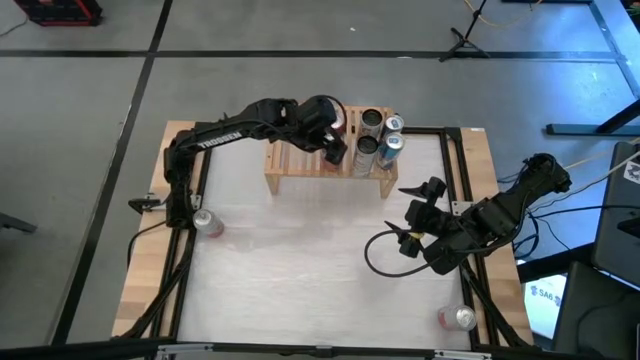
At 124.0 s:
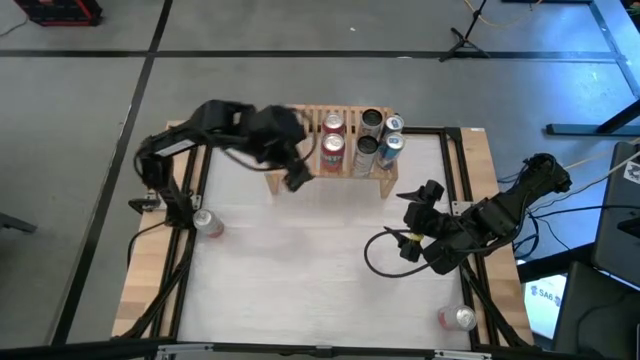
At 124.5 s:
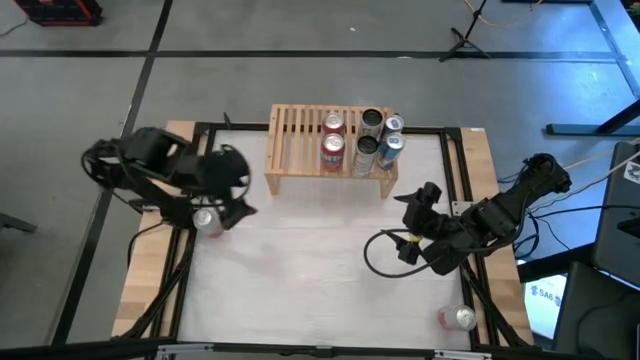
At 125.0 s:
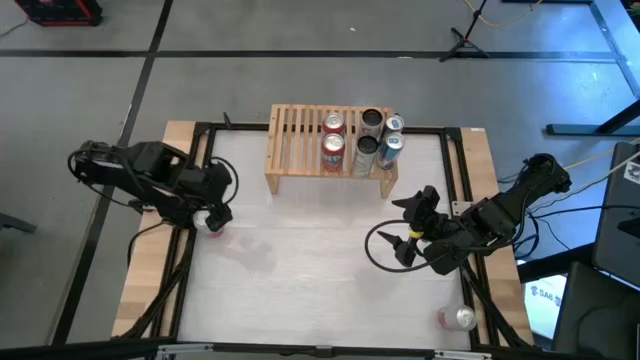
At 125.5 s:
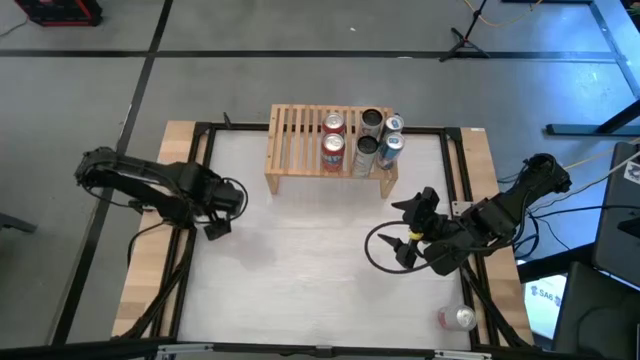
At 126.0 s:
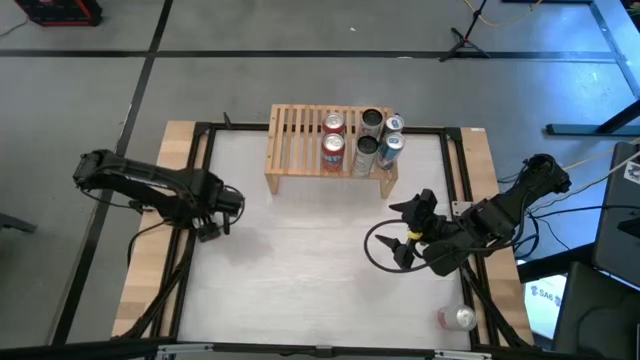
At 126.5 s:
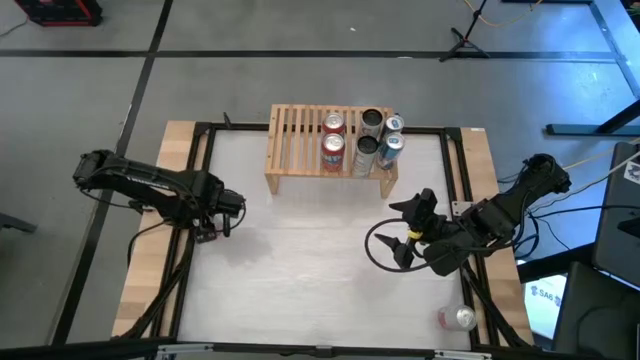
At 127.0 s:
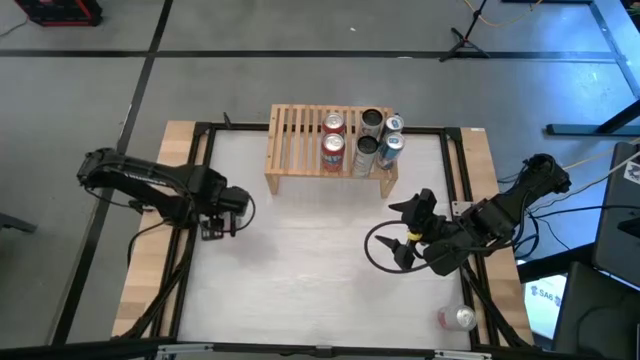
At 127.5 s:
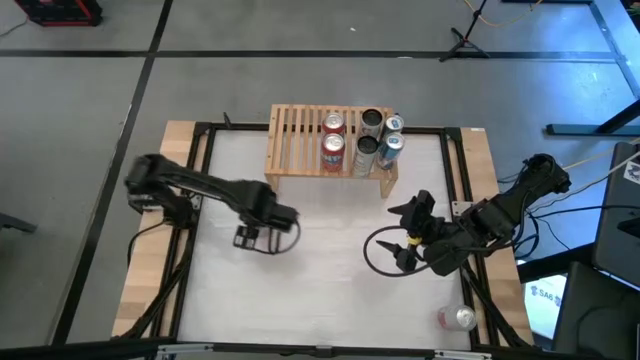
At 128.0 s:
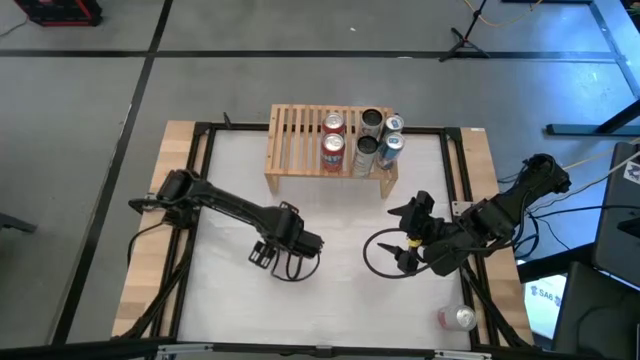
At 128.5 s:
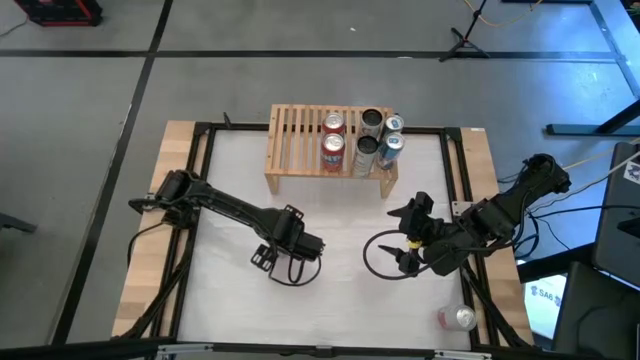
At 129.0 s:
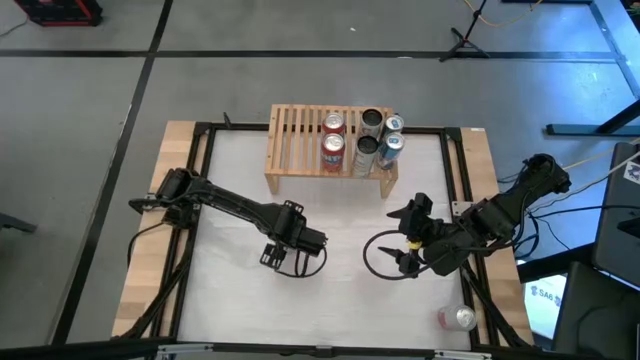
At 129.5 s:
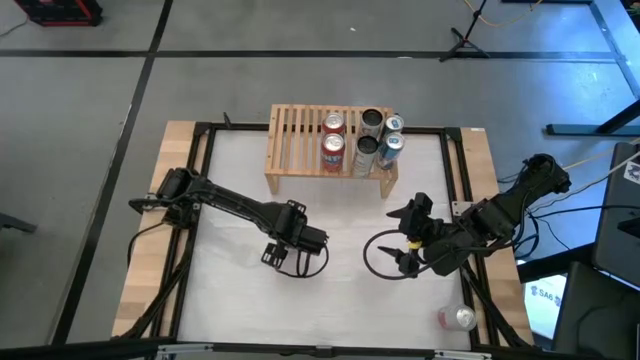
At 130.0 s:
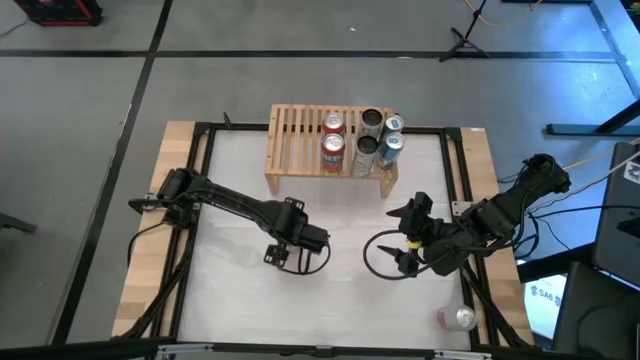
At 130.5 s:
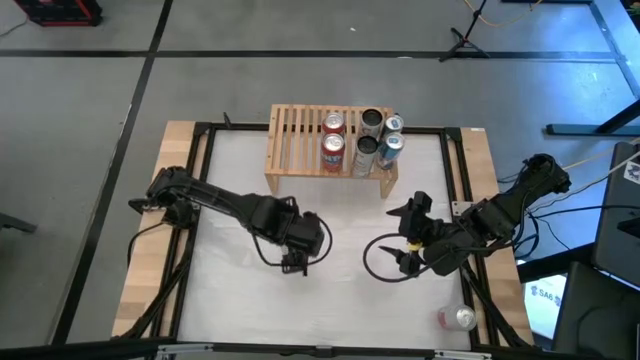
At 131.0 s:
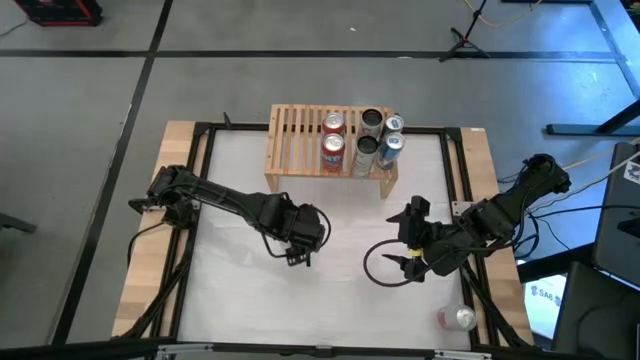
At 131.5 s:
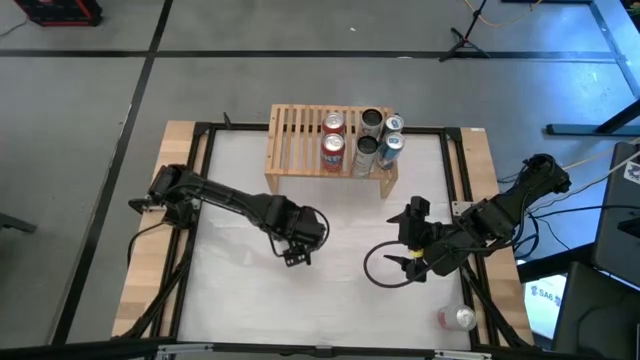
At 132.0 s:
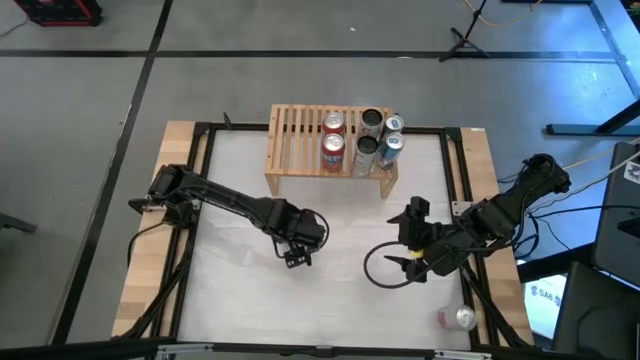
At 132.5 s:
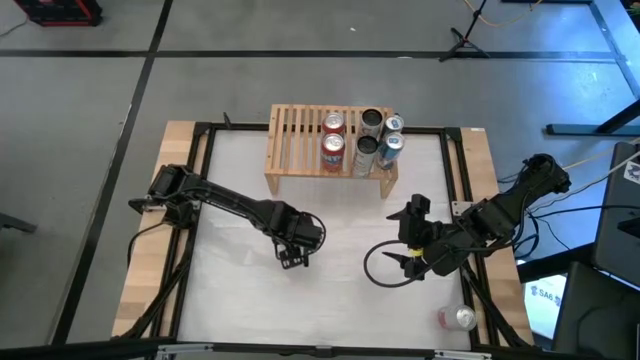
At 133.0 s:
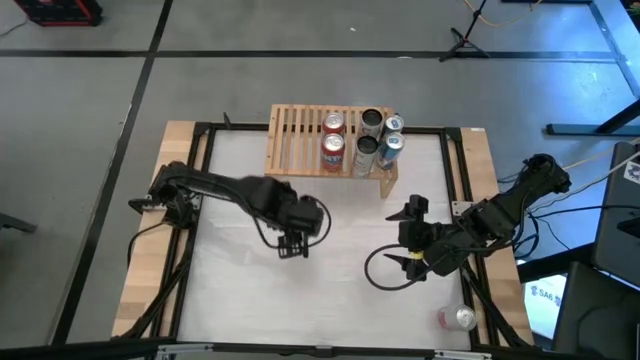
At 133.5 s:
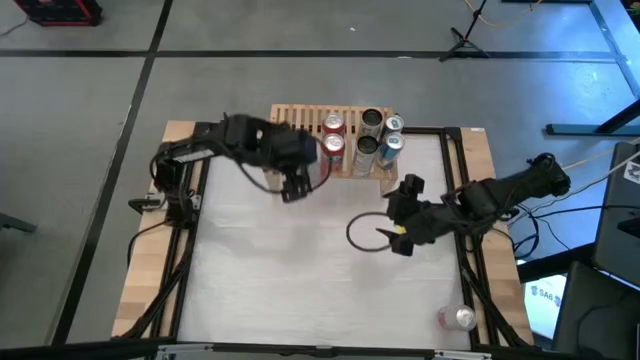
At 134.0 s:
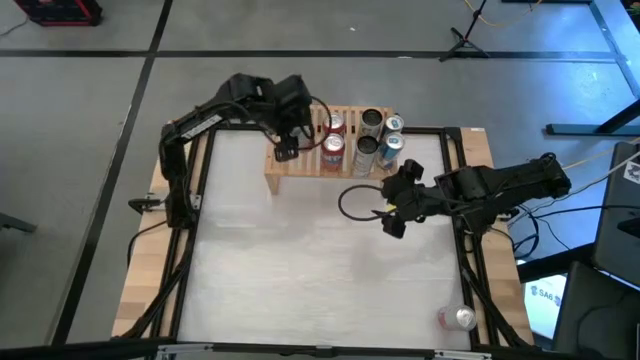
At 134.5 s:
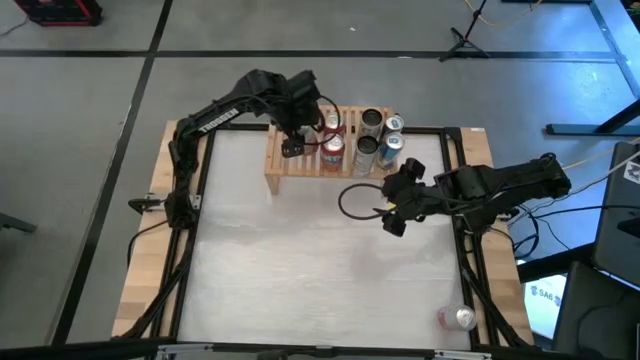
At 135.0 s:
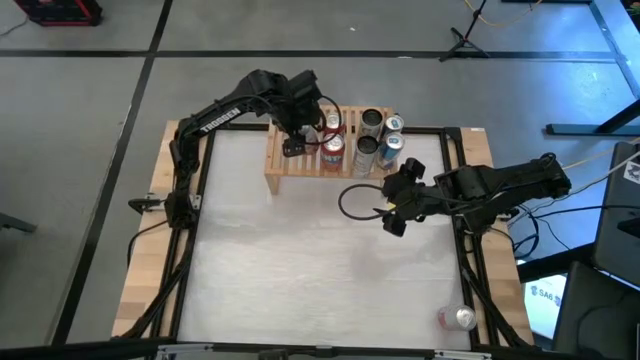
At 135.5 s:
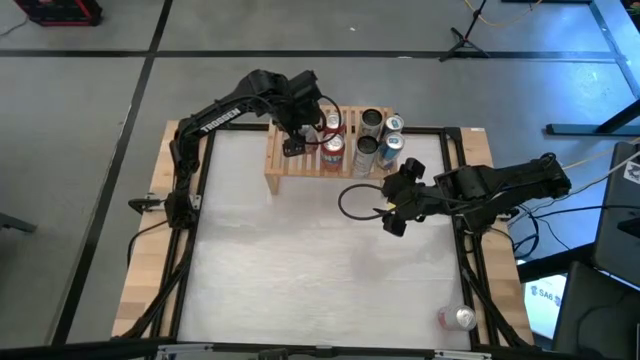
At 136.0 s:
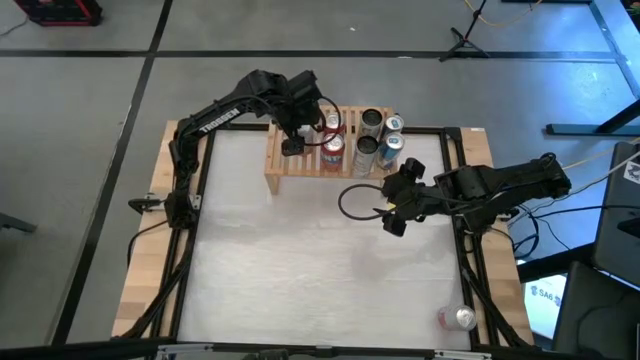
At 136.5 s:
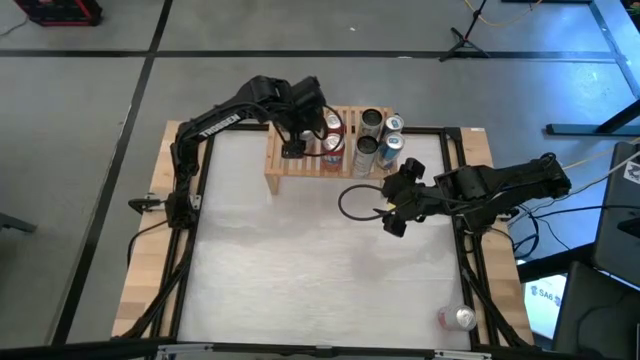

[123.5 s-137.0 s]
Task: Place canned beverage on shelf
Put the top pink soda can on the shelf

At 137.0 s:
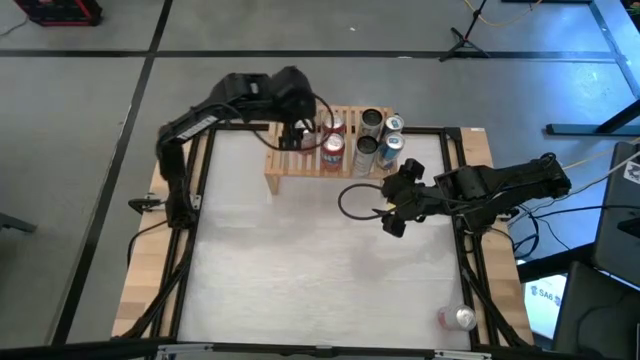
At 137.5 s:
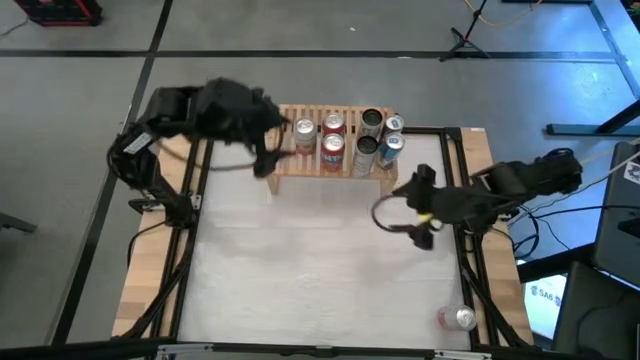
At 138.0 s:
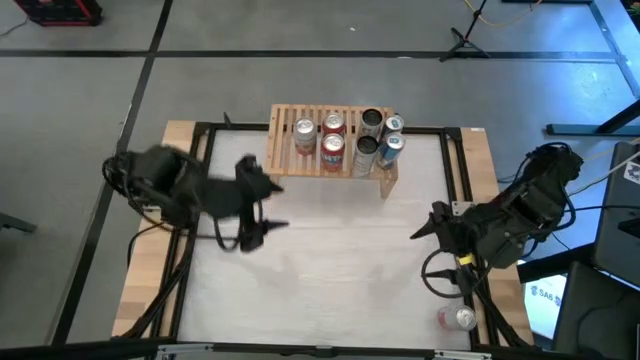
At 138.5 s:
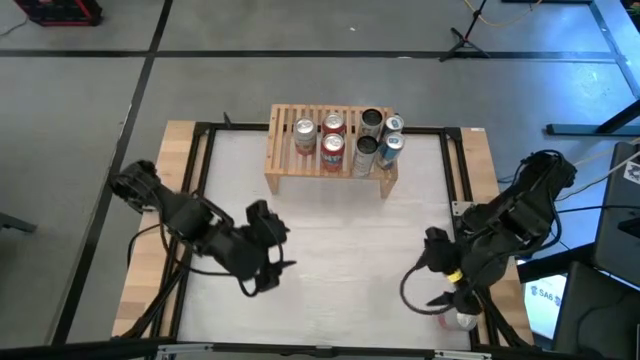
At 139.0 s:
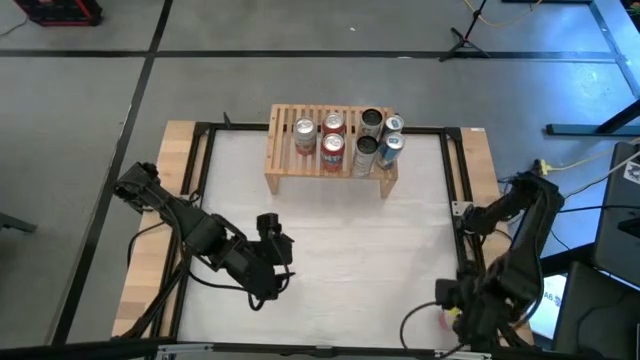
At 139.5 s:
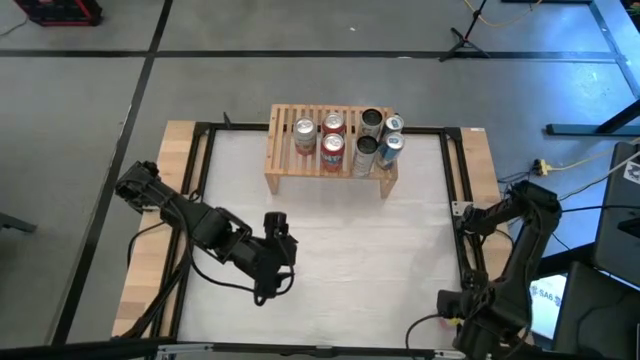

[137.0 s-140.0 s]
Put the pink soda can on the shelf aligned with the other pink soda can

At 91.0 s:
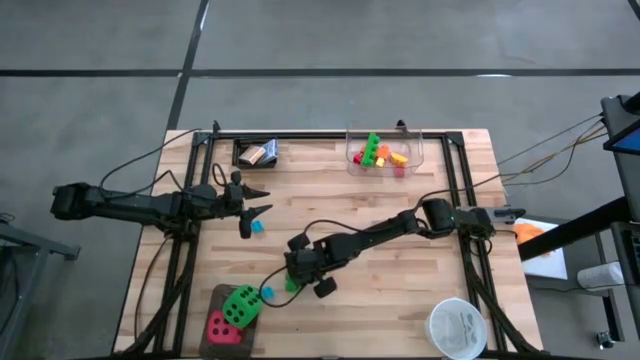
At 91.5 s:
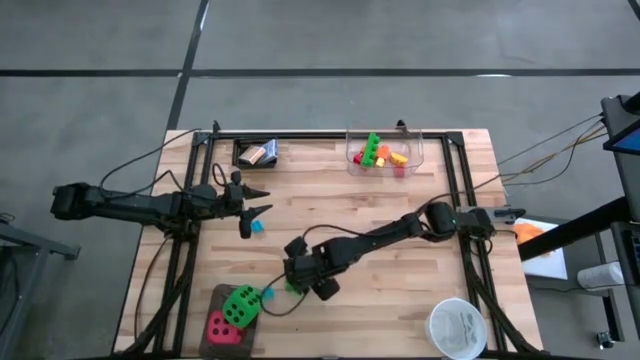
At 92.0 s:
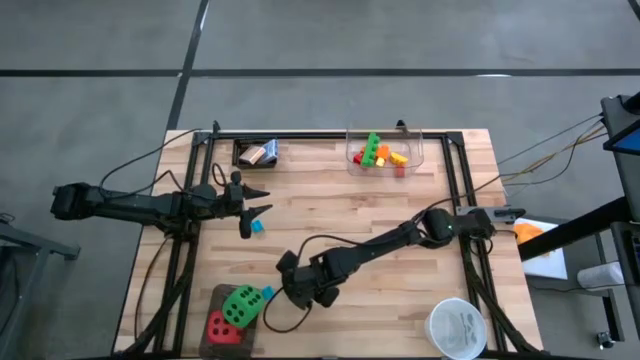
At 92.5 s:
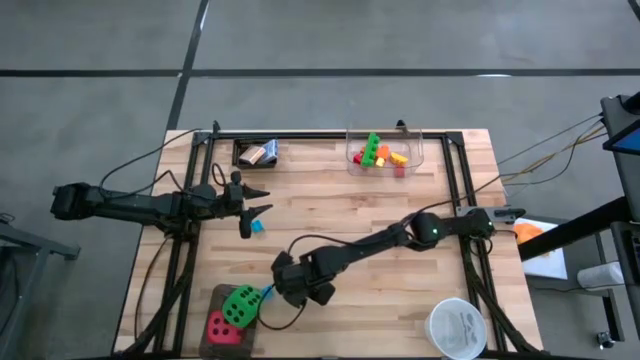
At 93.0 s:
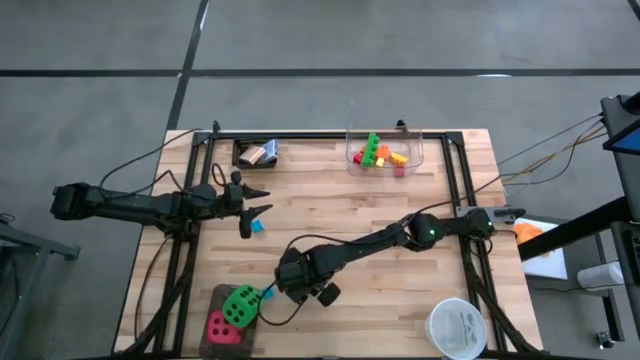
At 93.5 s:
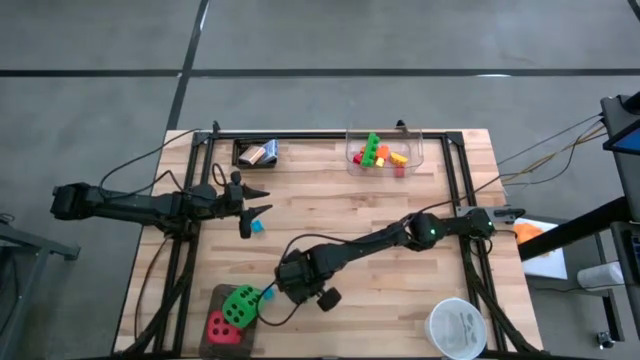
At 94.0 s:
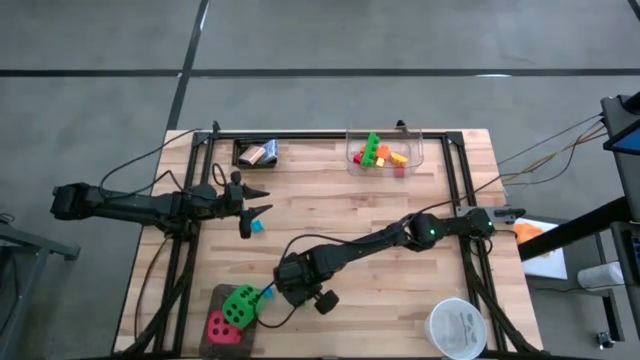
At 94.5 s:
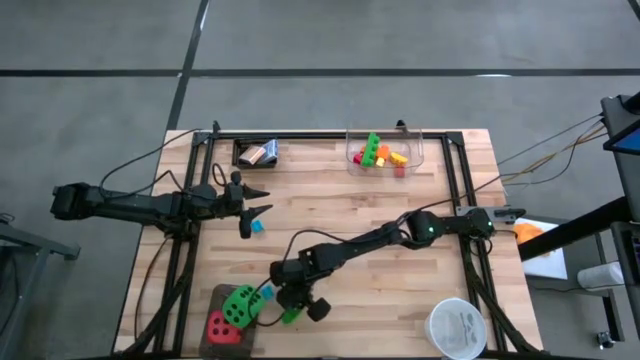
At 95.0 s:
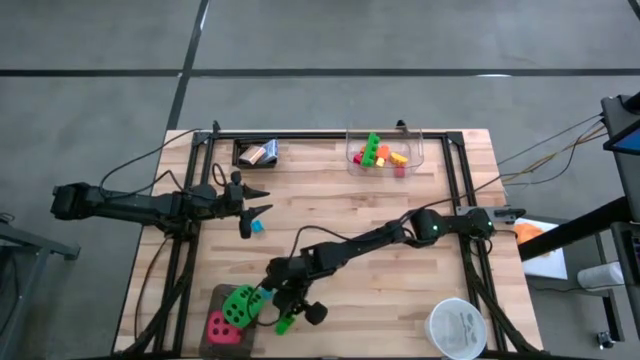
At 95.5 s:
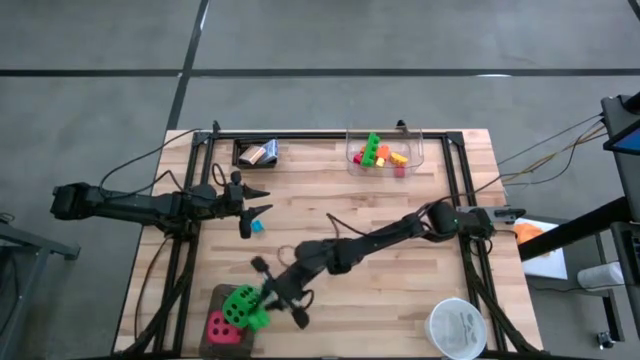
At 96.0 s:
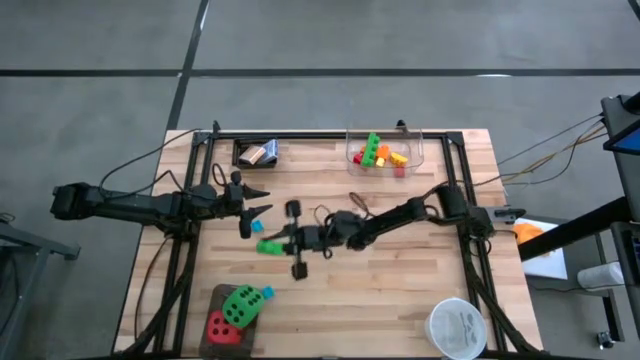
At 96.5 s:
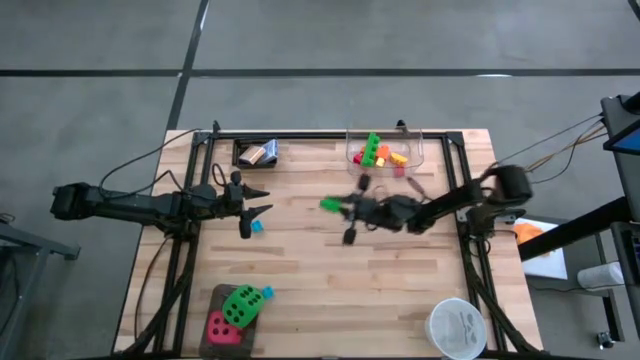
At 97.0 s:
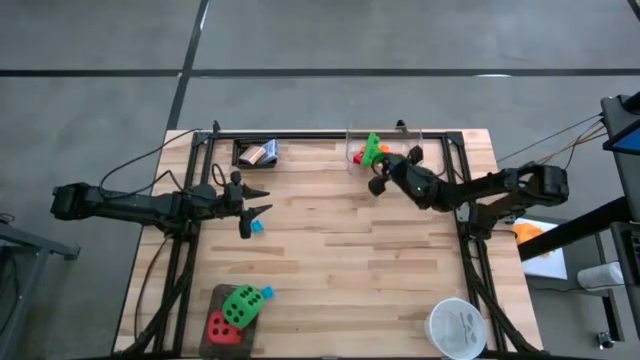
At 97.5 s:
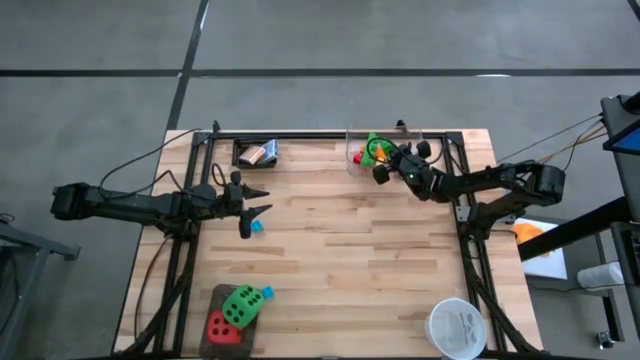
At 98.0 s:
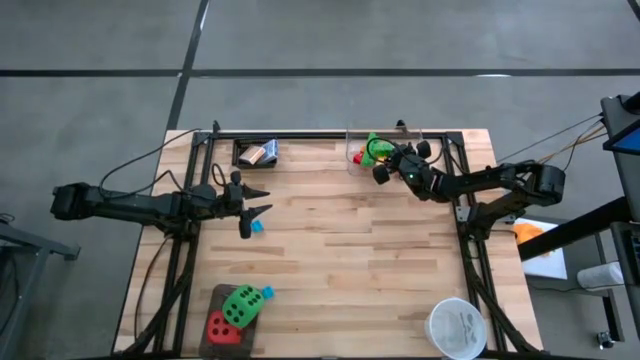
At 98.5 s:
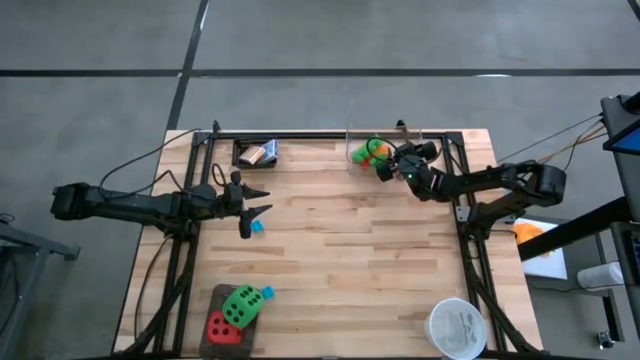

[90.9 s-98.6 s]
Task: Pick & Place Toys
Put the green game piece into the transparent bin
